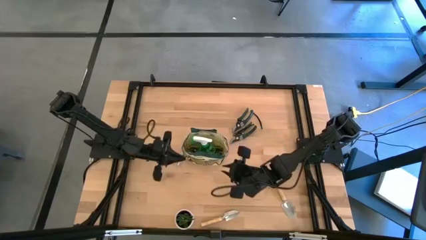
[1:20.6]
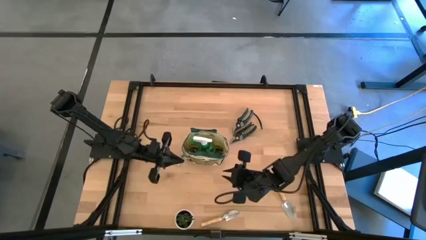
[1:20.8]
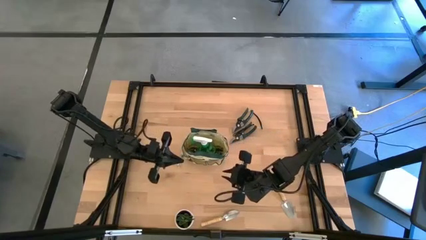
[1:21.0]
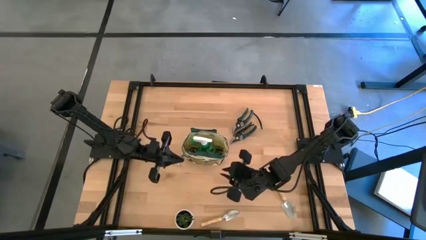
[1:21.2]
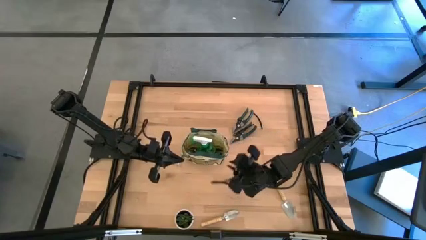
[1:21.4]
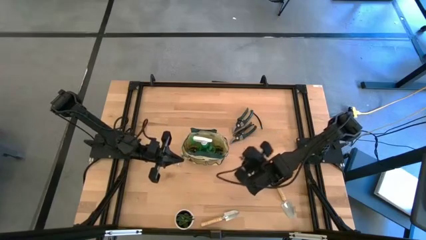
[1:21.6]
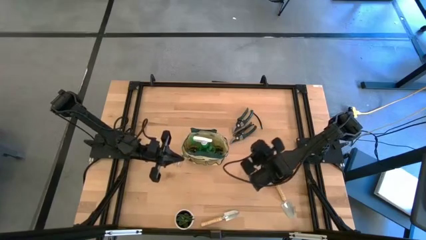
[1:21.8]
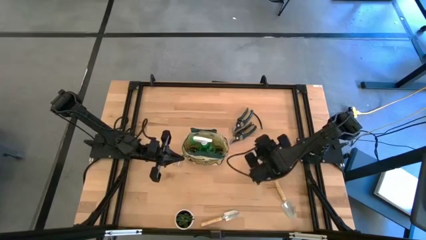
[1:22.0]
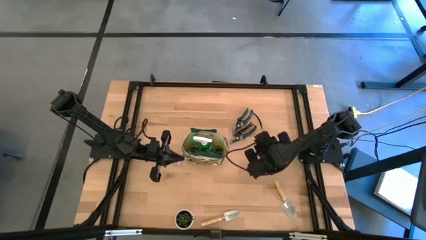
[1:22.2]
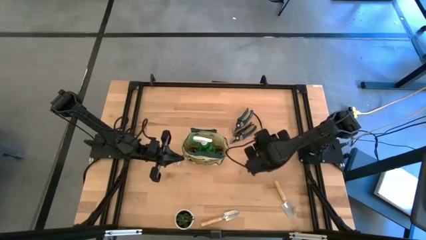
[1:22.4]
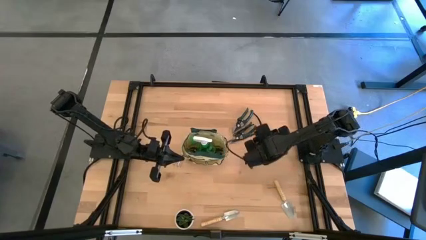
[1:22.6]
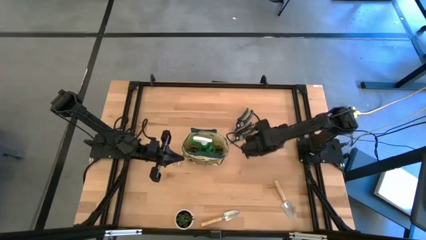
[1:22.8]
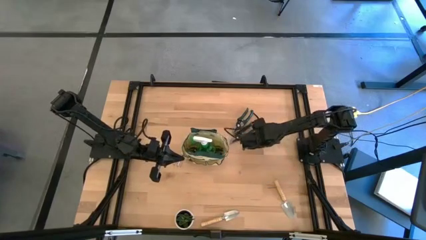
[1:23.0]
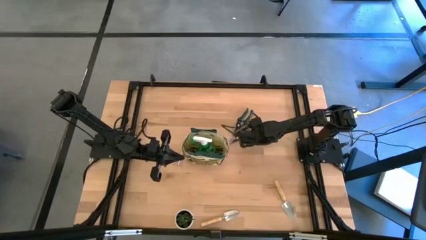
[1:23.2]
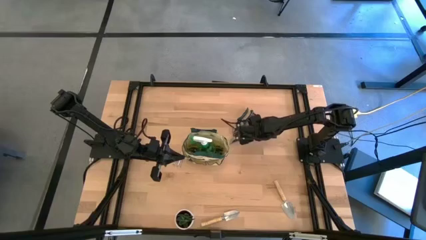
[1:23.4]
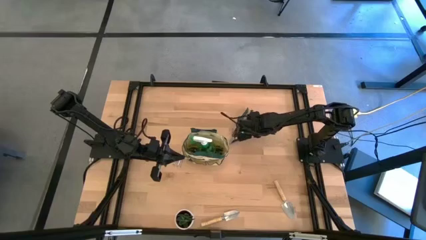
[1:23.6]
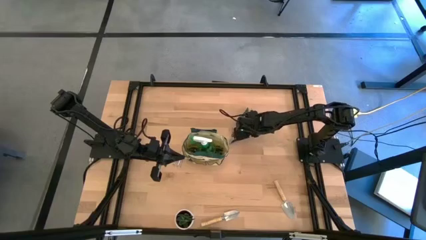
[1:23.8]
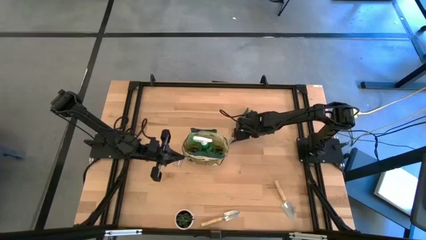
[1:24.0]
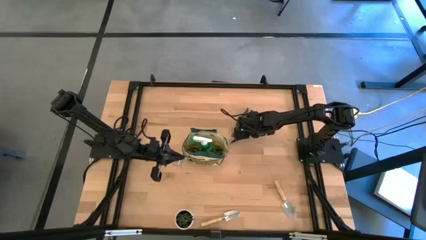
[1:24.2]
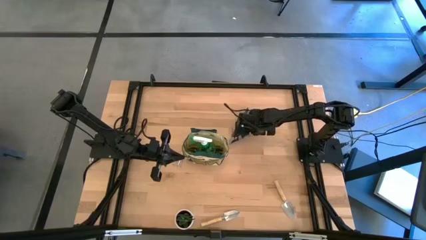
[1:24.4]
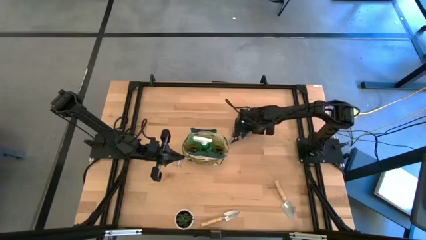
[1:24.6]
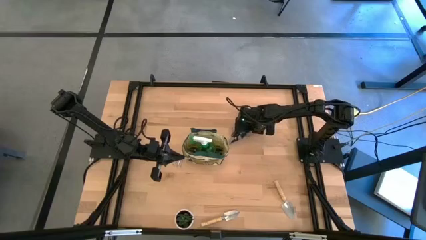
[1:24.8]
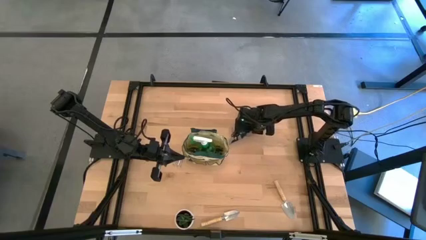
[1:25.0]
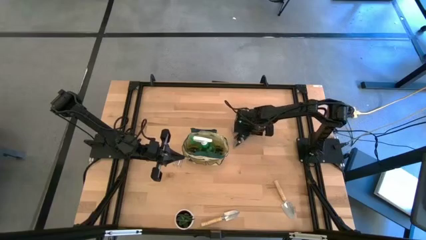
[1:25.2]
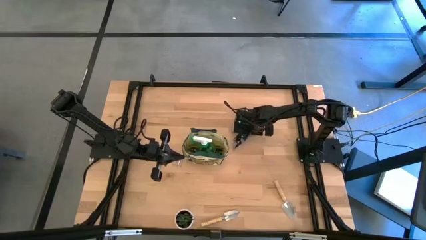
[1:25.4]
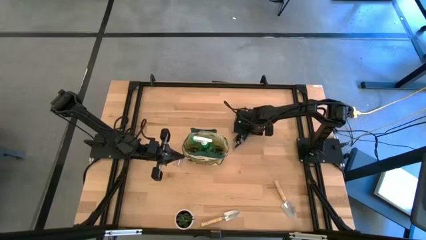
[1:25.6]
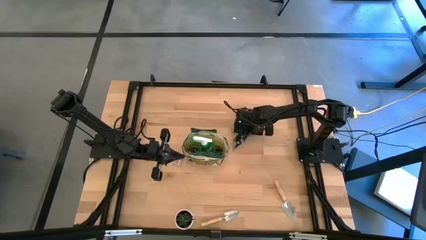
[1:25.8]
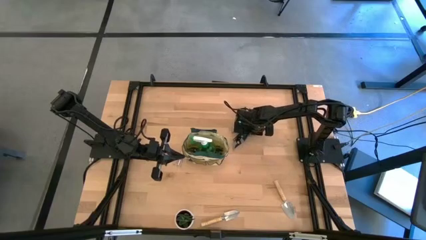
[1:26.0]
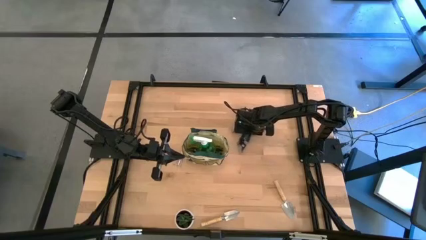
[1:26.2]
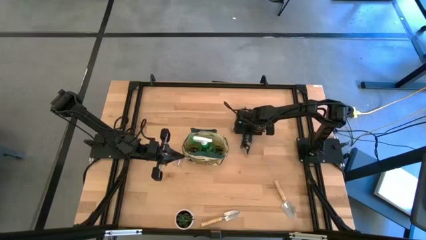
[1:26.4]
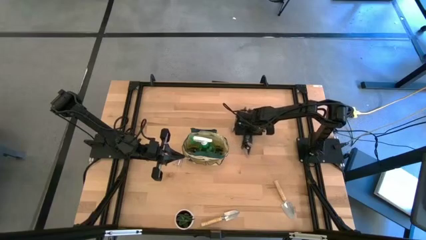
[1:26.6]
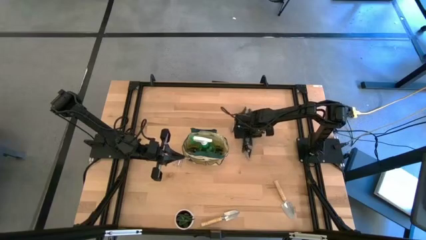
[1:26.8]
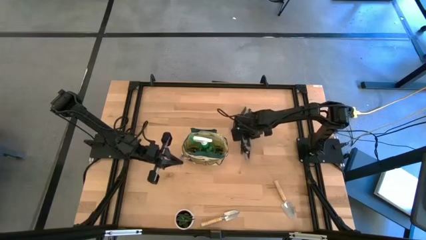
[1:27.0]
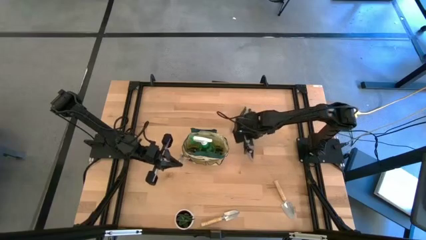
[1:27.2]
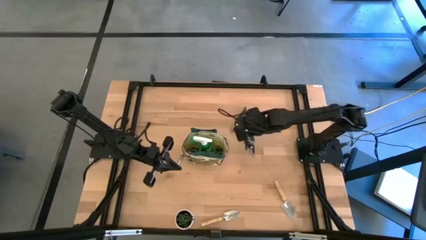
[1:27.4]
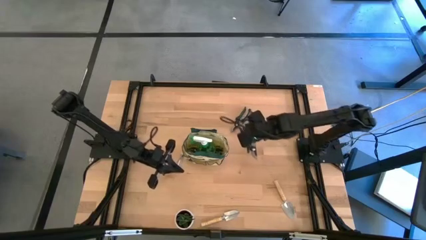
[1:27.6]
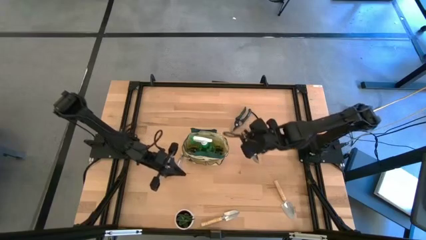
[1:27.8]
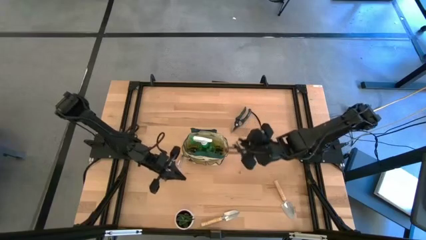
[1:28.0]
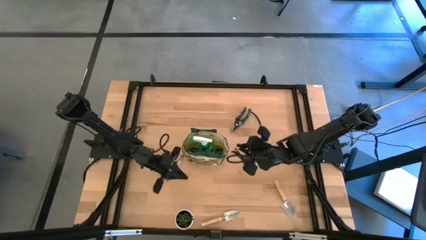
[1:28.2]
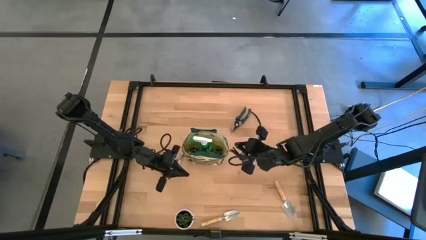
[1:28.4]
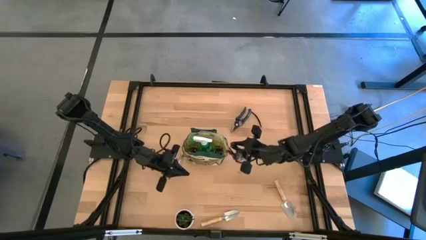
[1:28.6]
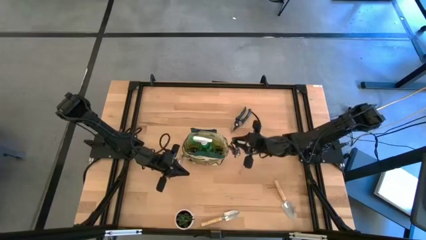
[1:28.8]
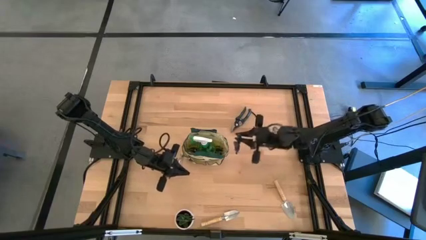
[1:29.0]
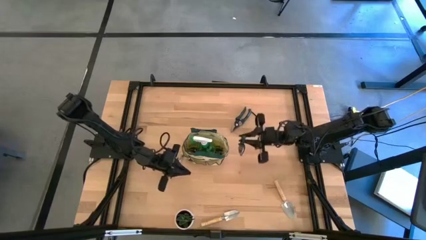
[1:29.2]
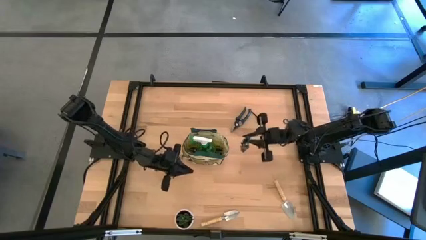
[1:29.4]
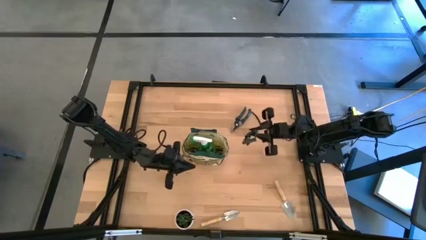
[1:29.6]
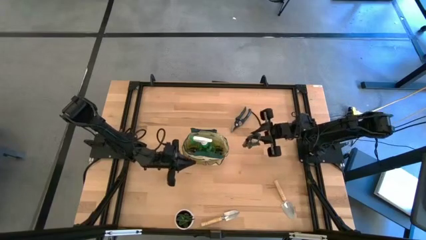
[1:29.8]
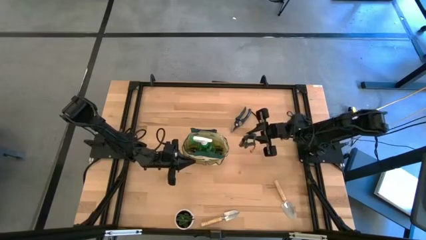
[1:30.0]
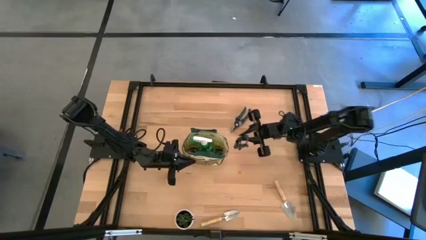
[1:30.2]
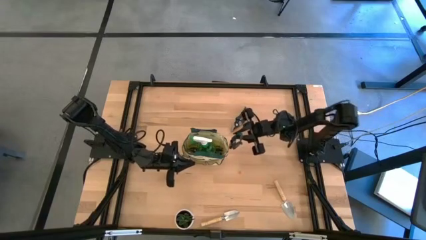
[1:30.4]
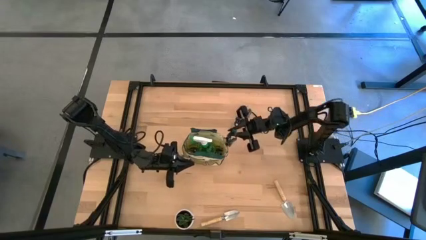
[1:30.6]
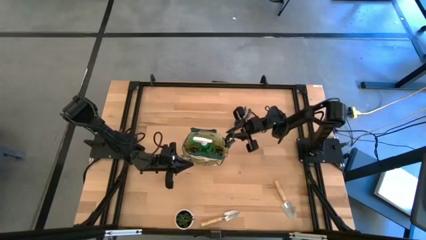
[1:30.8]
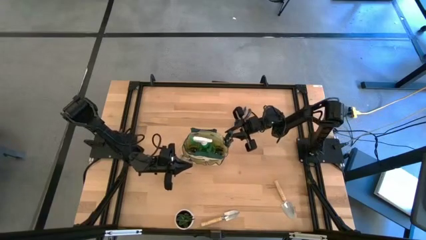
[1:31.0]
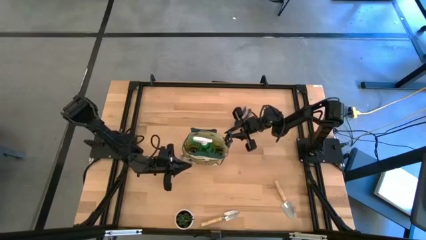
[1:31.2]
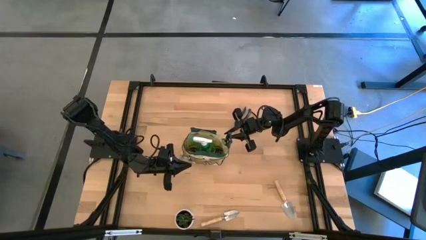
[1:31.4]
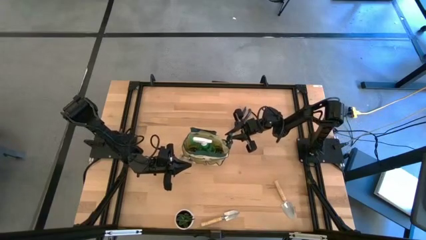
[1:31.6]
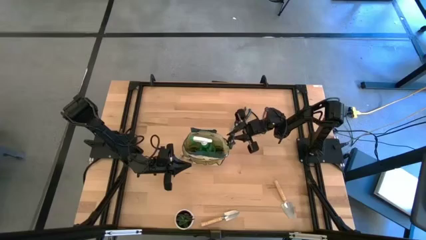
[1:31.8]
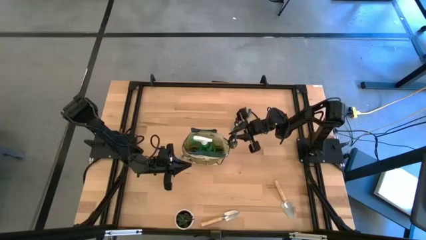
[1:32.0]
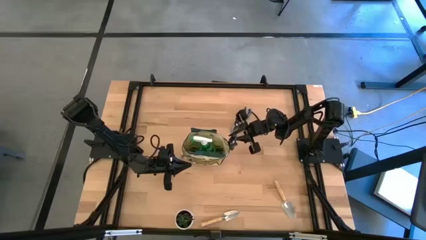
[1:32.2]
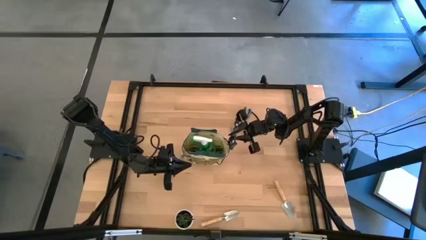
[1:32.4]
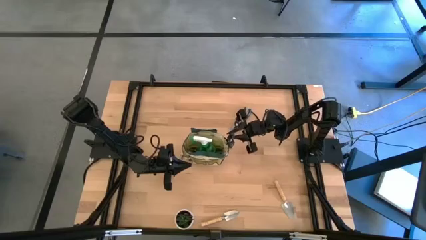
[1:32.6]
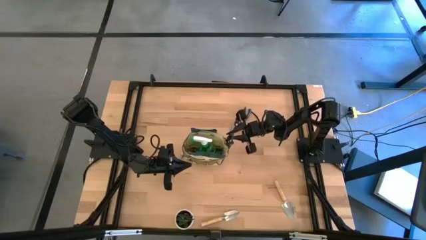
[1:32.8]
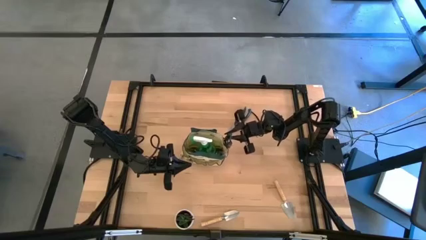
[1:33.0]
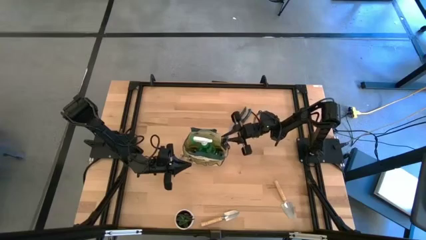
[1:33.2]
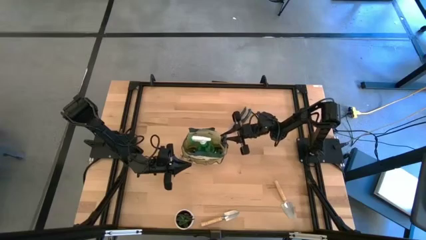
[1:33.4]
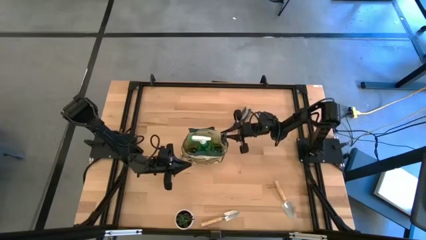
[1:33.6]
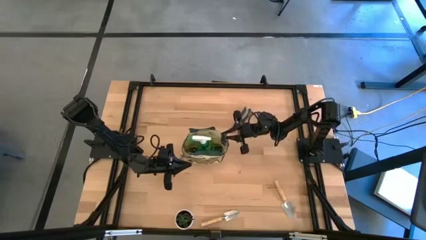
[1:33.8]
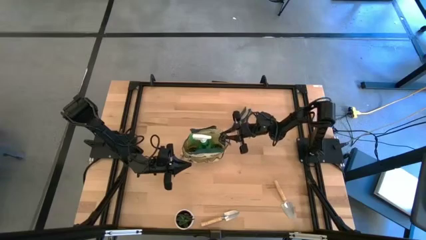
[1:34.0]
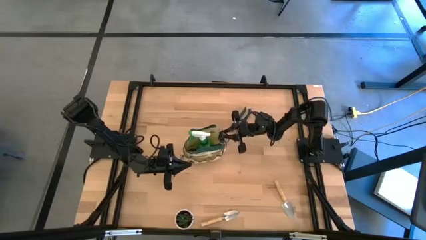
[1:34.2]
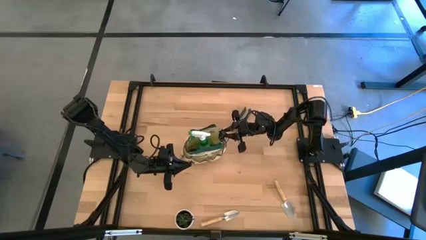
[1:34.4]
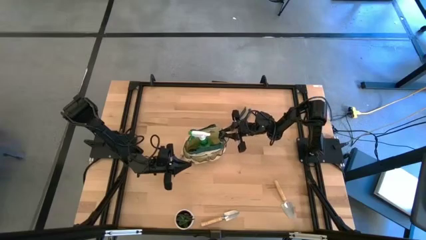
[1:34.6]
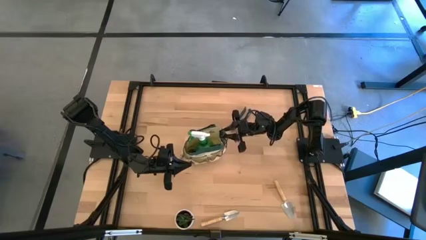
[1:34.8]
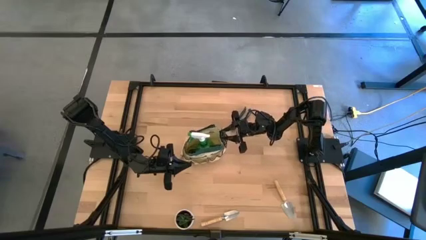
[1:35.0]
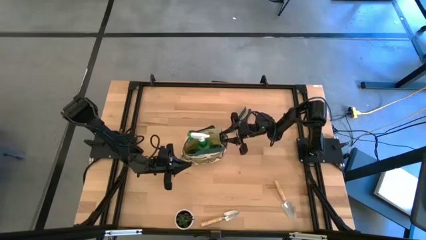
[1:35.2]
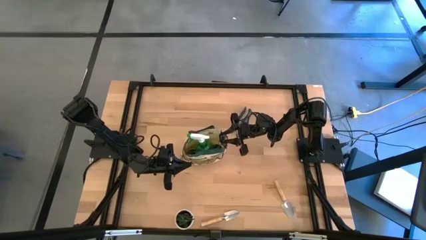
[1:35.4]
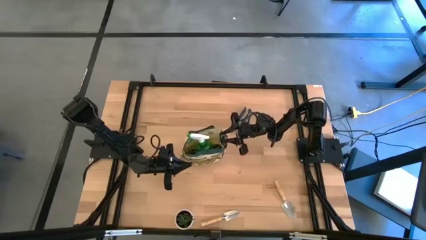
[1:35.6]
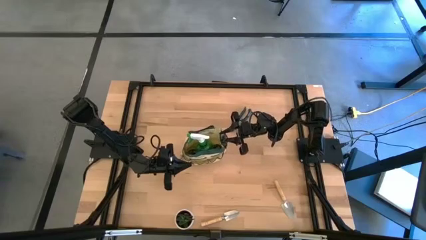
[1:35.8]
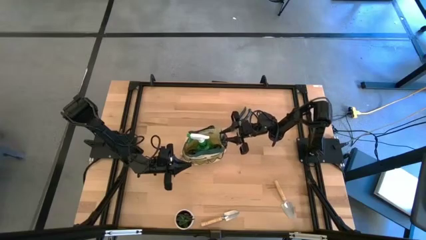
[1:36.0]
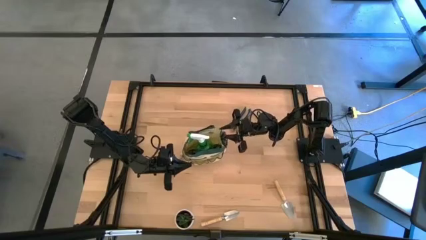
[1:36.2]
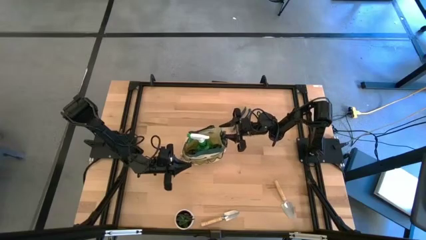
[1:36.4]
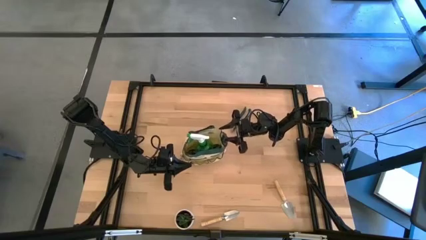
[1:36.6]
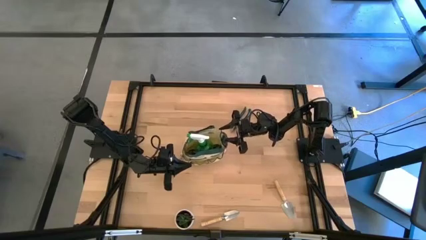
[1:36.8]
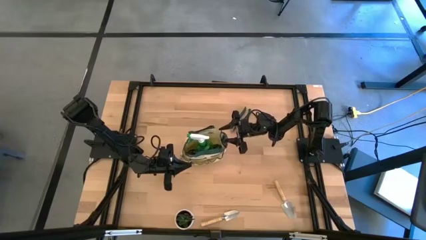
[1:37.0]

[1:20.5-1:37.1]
Task: Pick & Place Garden tools in Gardening bag
Put the bottom shear scissors into the side pocket of the green gardening bag
